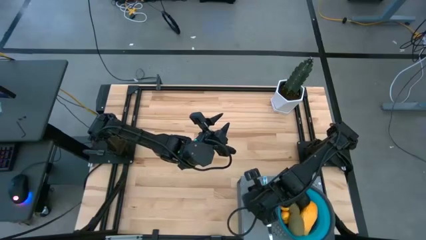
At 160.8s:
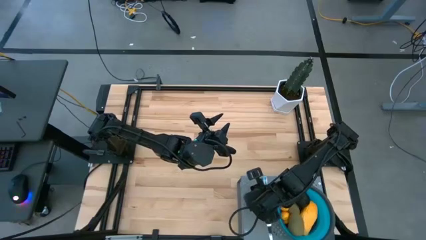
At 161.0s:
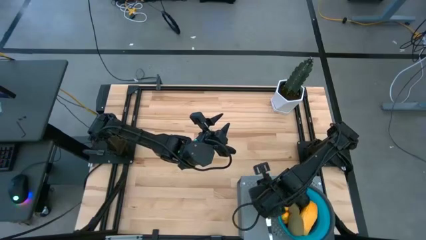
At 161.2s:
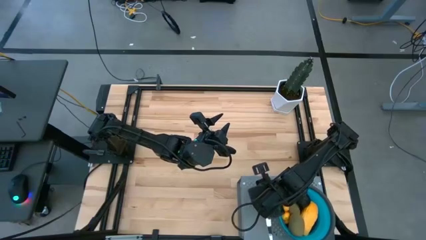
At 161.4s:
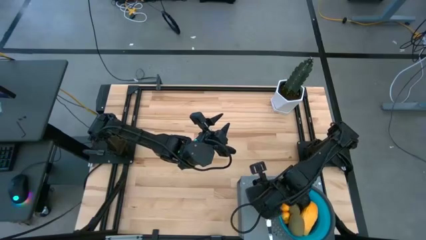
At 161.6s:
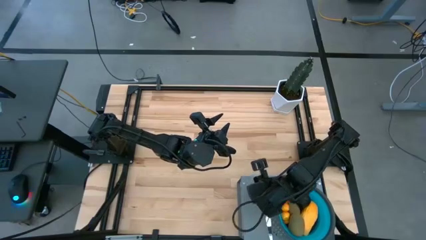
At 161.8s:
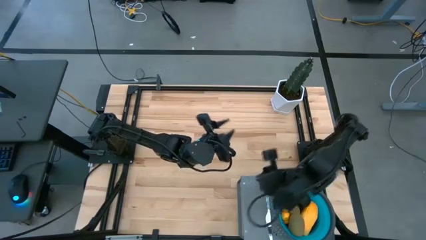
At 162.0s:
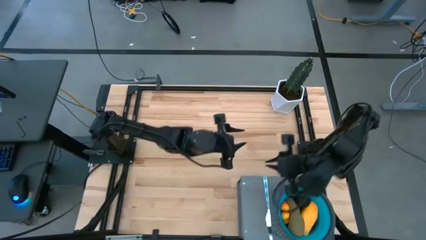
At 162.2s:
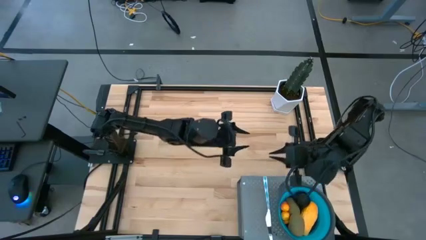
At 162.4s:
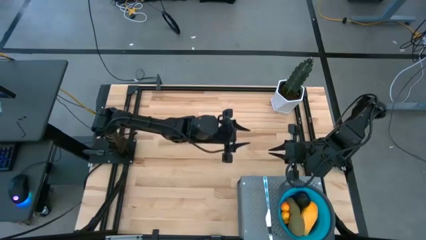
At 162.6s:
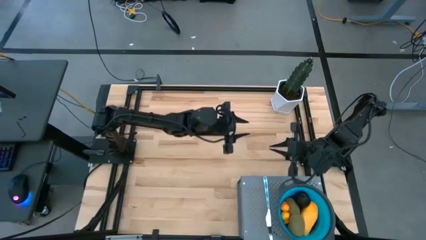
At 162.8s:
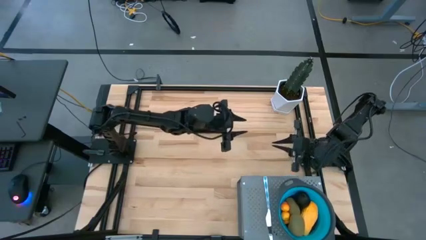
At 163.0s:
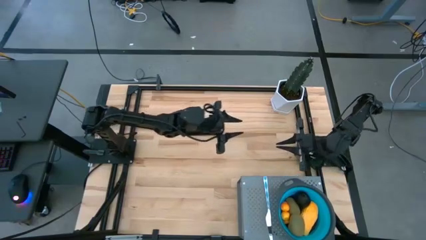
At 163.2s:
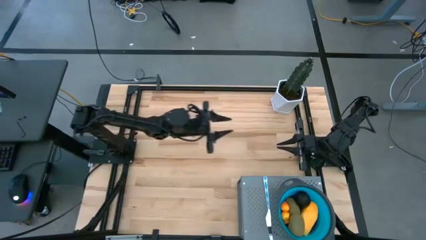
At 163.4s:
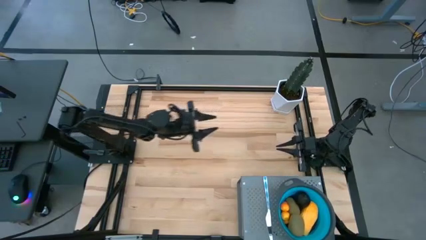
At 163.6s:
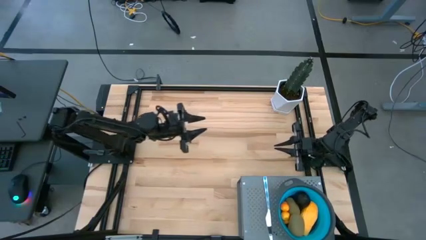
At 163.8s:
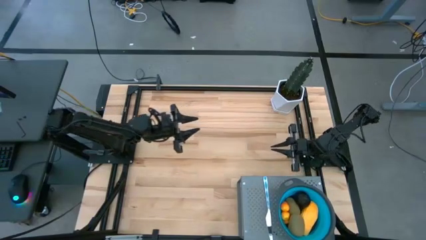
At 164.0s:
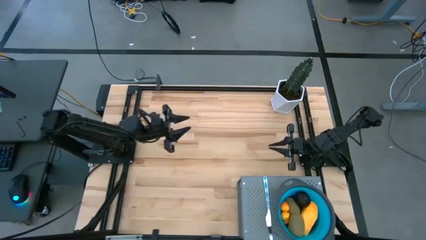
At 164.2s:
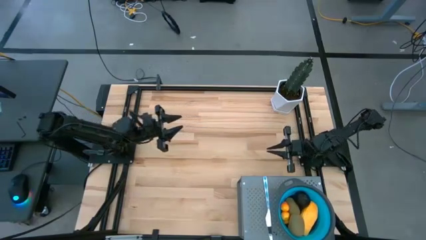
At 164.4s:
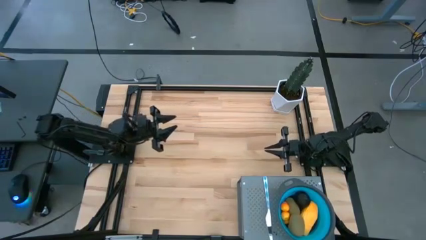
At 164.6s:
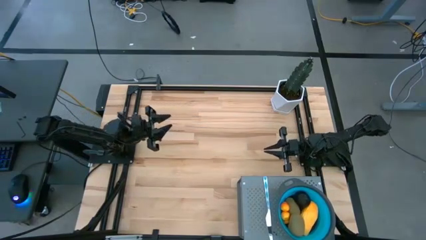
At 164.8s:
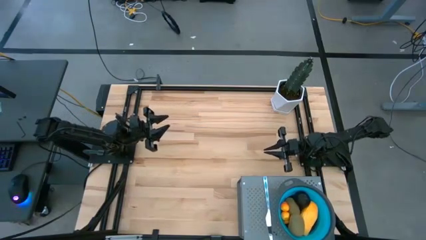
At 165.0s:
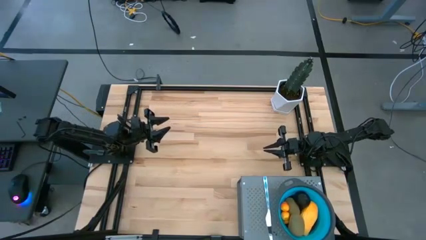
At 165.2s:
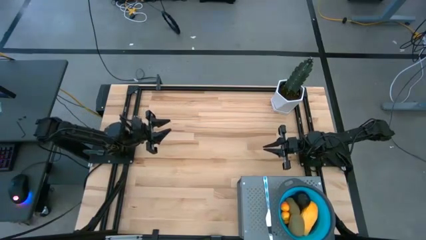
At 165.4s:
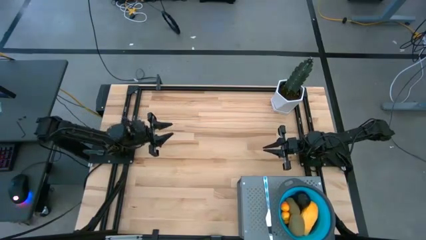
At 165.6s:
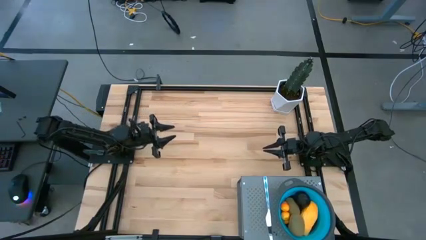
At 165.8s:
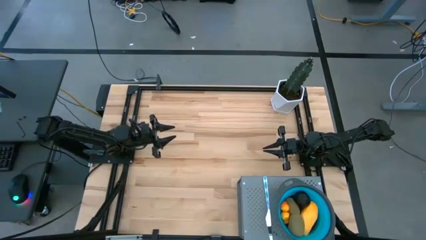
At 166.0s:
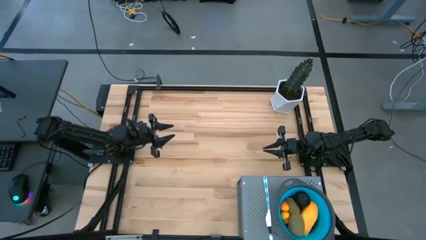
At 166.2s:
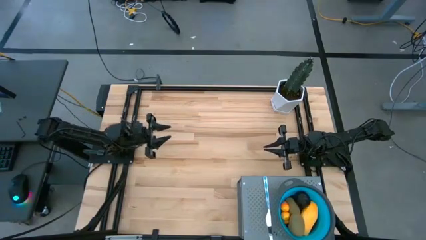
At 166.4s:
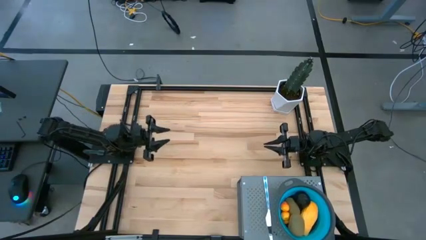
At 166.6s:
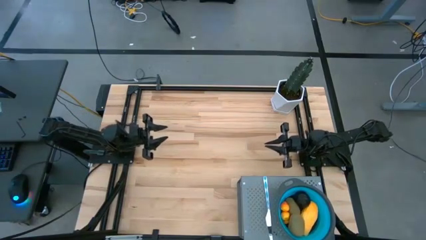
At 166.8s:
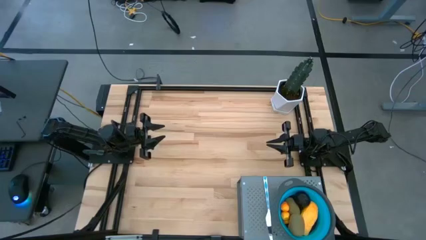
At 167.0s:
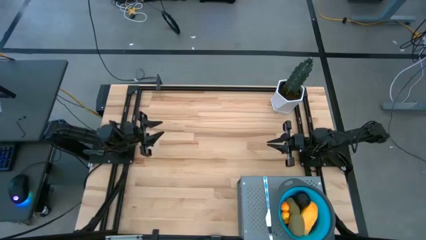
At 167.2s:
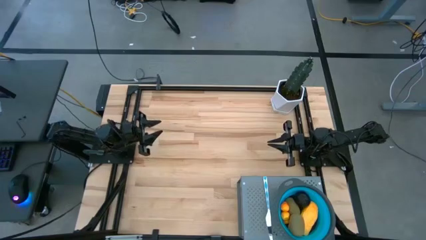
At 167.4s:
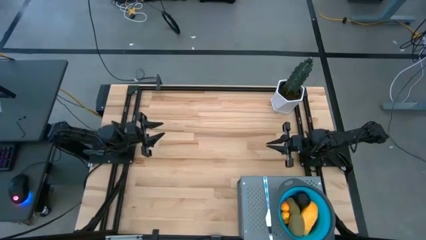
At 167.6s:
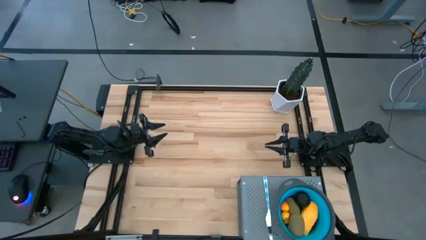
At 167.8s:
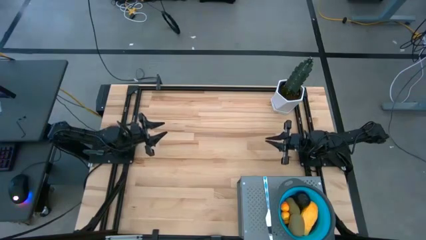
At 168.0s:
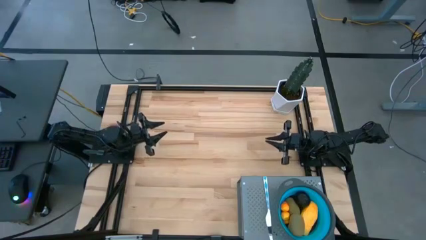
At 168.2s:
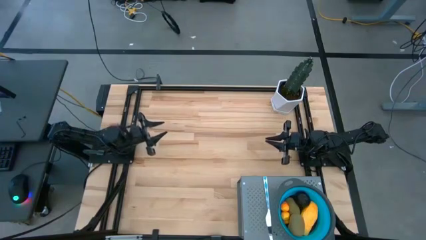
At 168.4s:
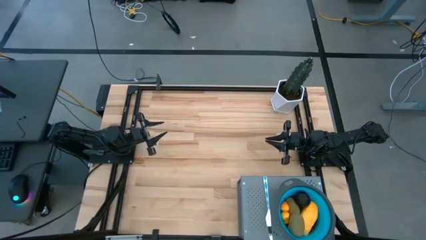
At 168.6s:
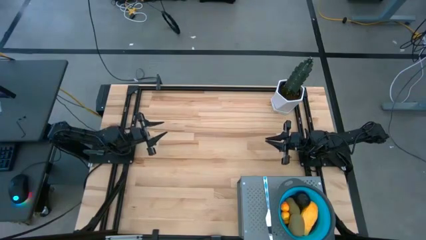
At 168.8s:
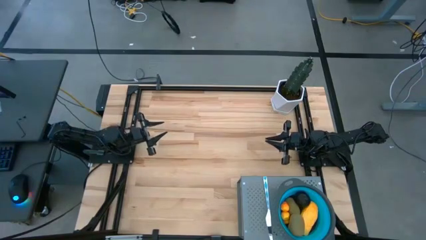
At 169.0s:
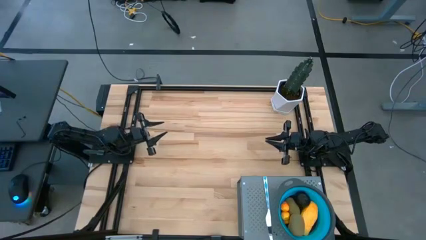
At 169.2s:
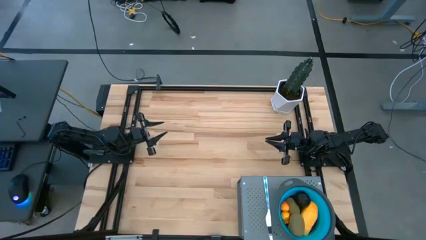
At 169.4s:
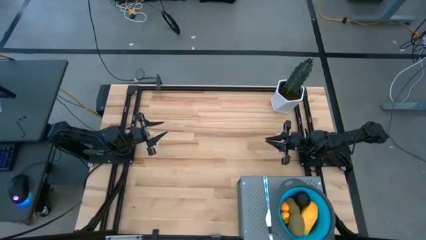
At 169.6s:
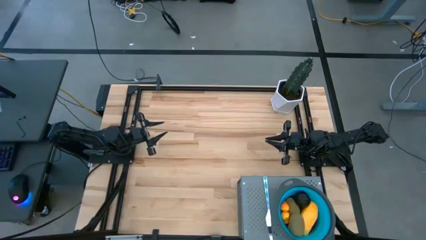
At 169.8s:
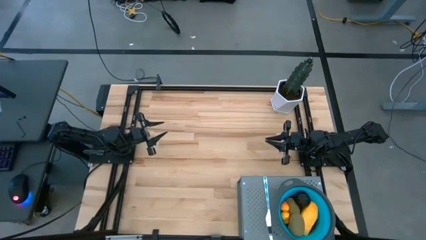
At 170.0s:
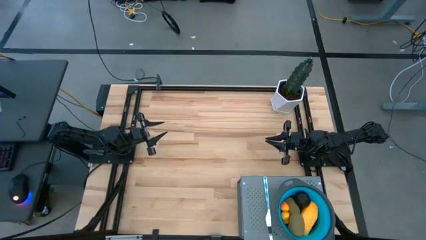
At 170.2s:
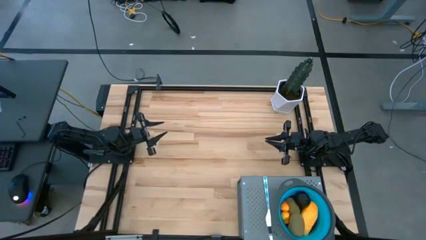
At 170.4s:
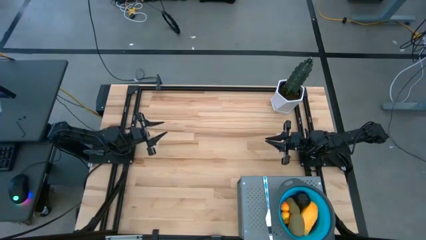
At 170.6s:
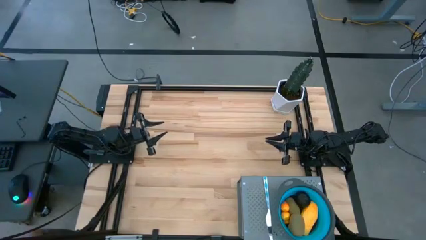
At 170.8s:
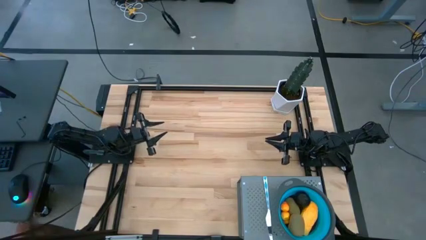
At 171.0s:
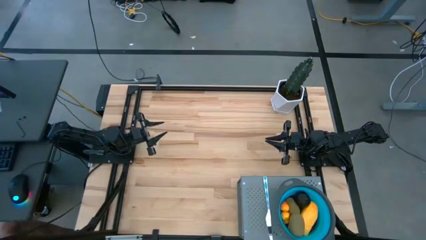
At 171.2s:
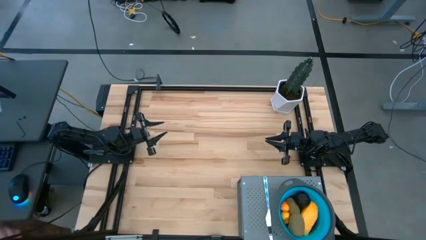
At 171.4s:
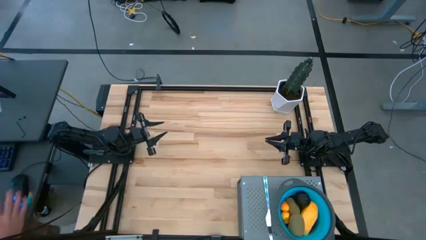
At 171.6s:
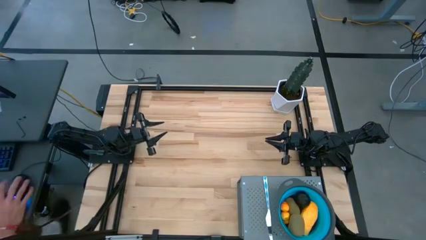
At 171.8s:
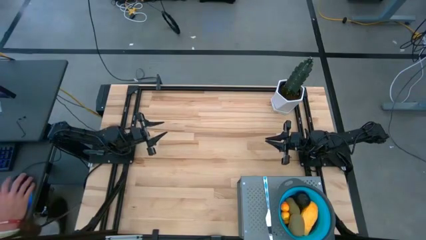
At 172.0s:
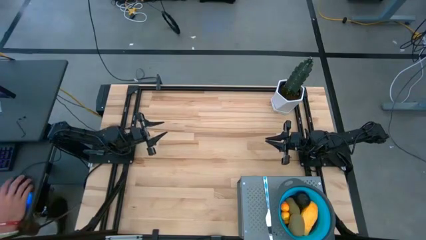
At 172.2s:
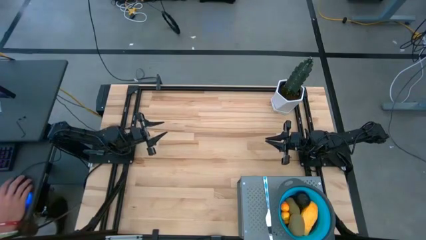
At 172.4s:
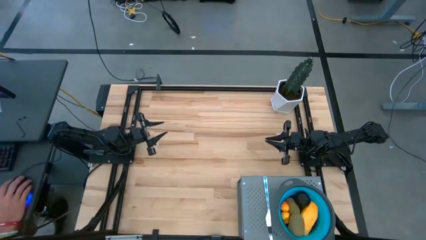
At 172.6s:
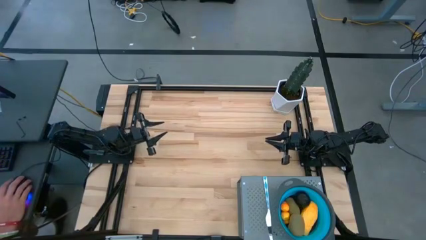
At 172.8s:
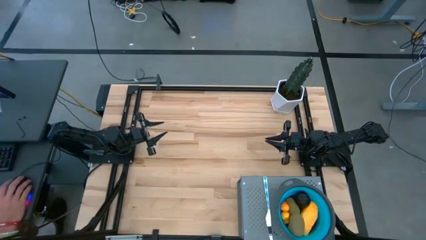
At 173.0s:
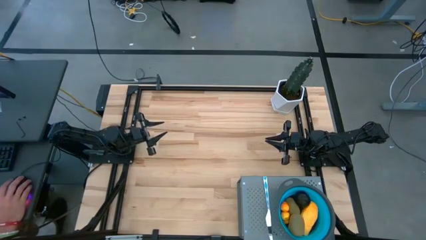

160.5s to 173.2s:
Task: Pick & Place Fruit
Return To Home Position

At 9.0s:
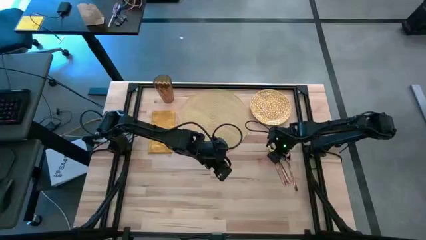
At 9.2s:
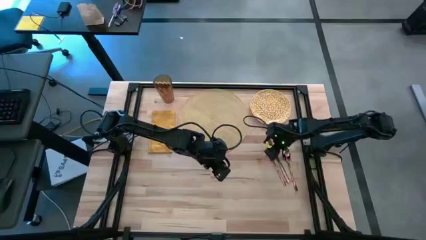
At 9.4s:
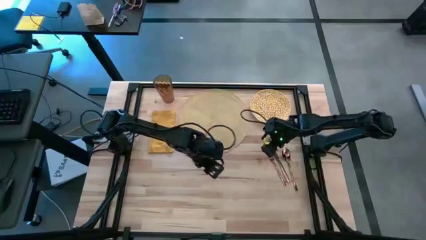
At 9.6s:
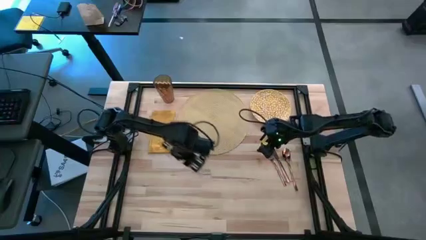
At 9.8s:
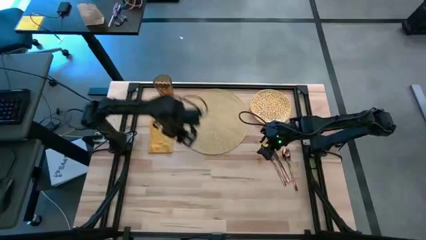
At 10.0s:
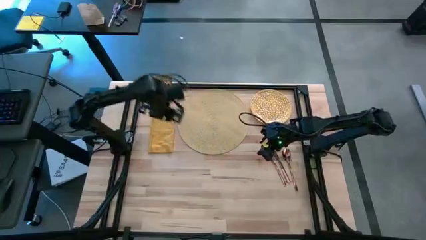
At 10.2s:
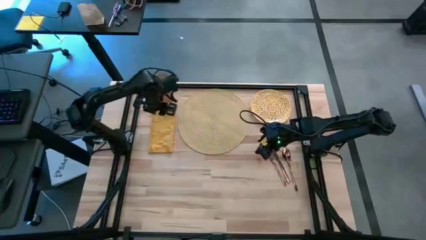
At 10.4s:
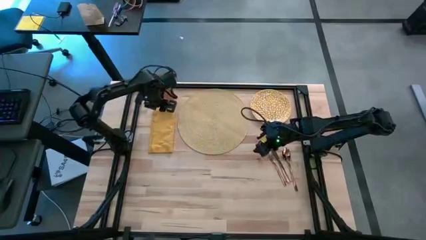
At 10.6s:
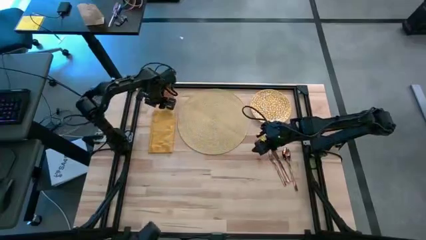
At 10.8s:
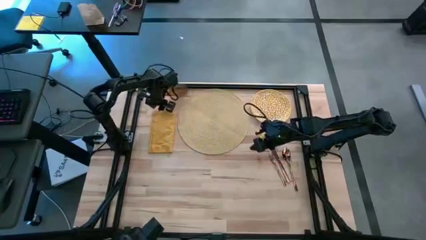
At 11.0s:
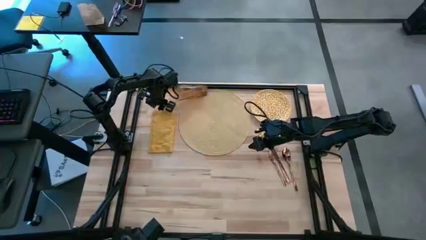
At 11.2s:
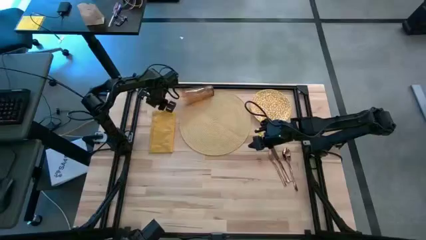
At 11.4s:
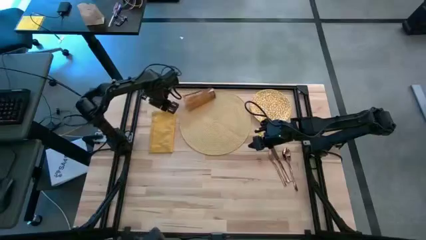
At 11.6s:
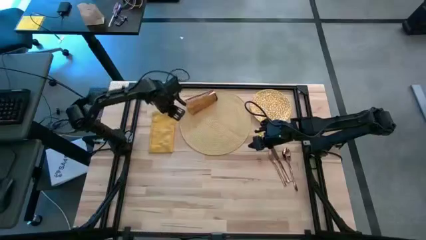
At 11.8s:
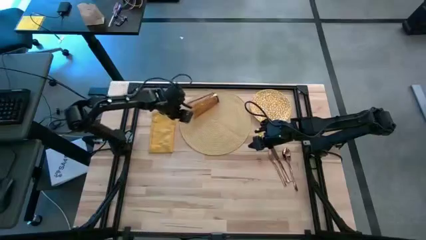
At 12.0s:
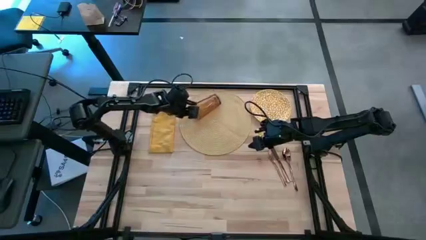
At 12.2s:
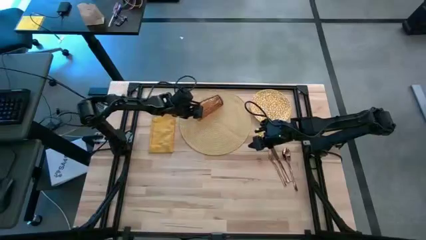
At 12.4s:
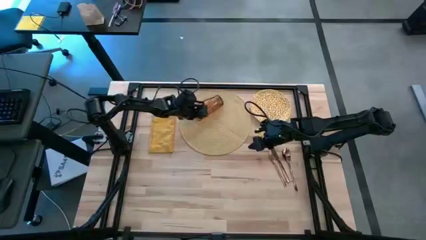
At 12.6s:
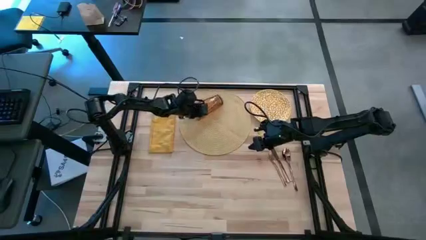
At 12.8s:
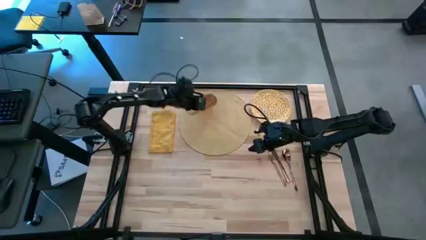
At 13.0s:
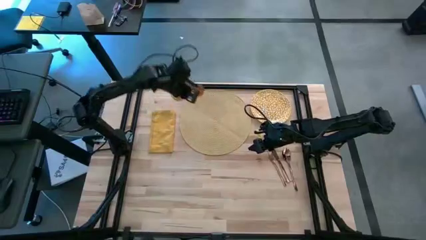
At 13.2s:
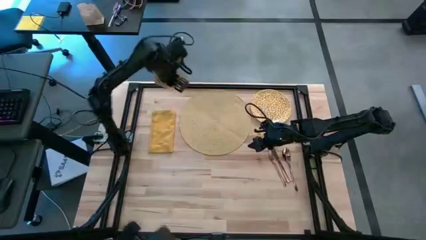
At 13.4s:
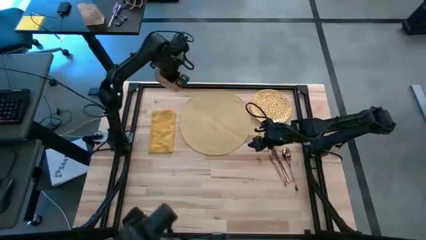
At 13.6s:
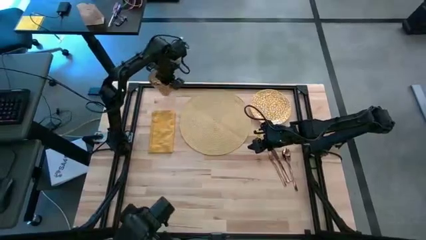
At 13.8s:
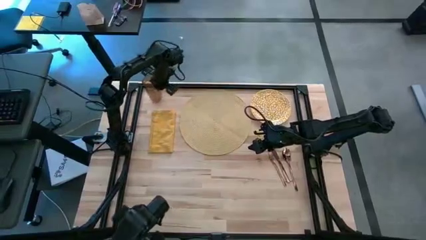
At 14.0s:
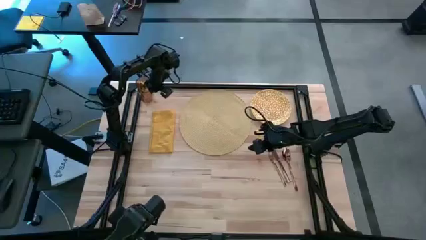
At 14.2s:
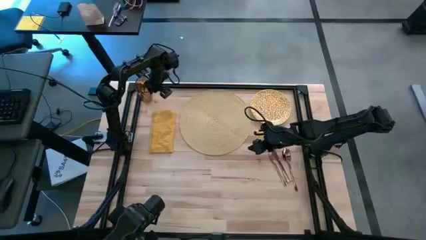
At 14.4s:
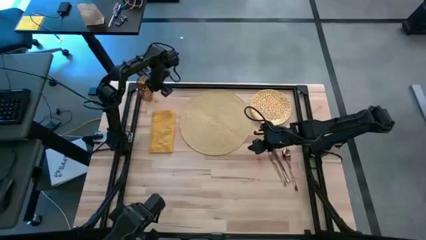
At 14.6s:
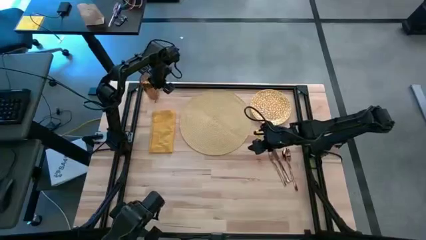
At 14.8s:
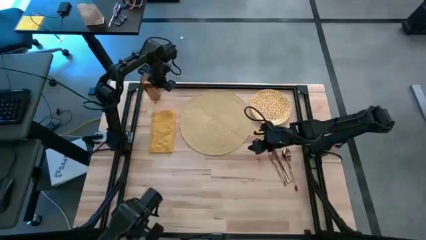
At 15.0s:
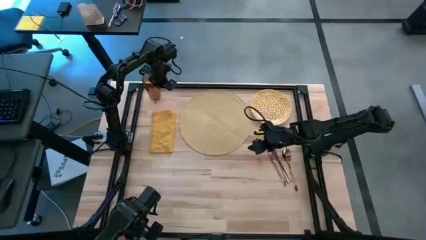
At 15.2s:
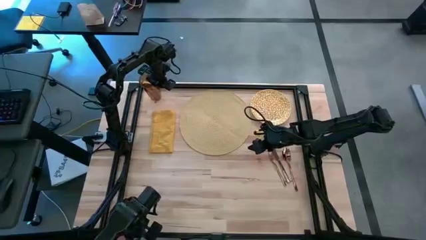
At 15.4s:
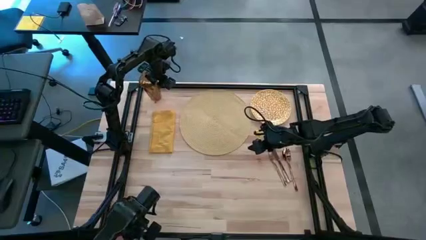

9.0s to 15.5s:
Task: Set table place
Adjust the brown cup
